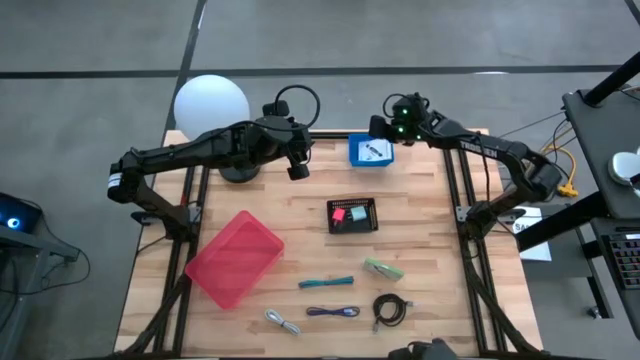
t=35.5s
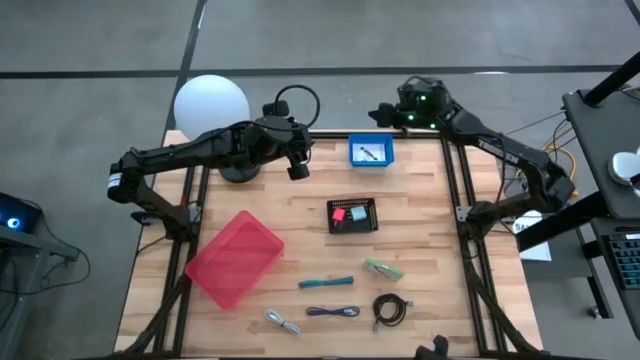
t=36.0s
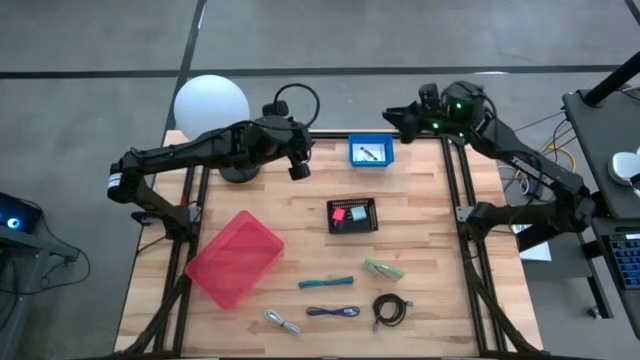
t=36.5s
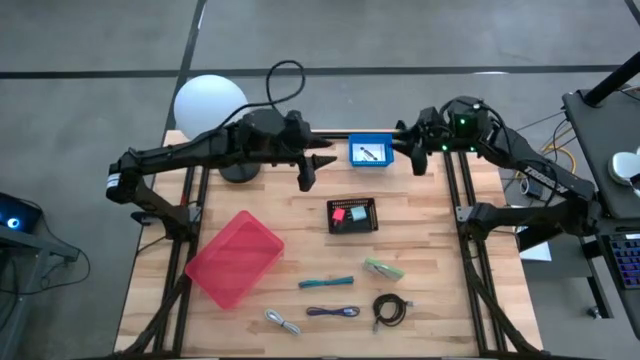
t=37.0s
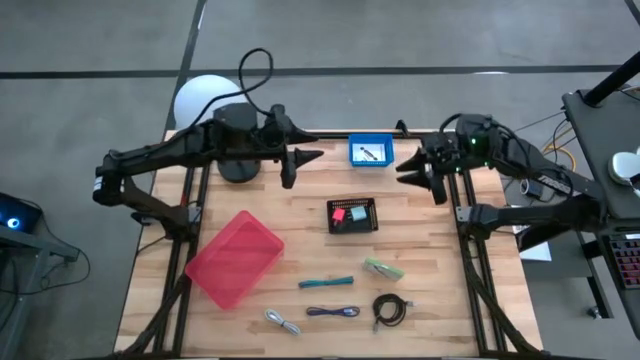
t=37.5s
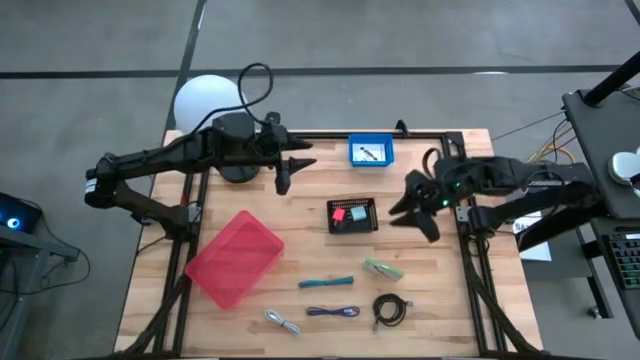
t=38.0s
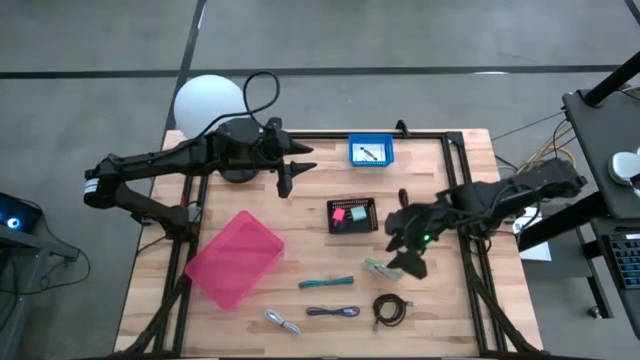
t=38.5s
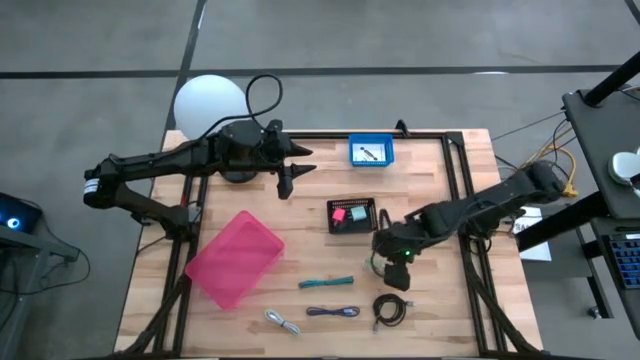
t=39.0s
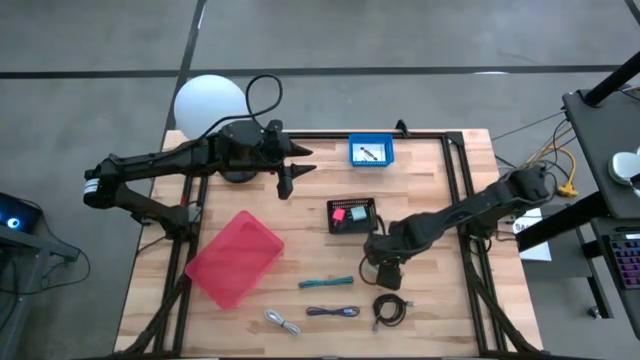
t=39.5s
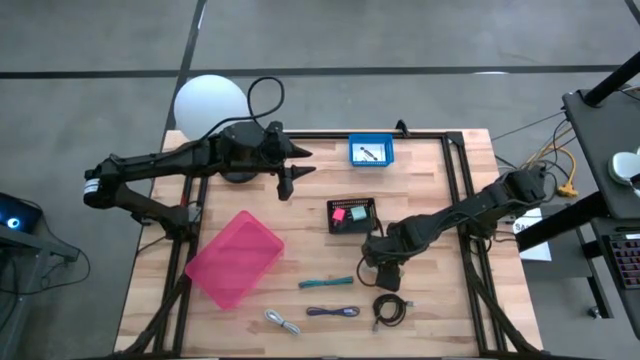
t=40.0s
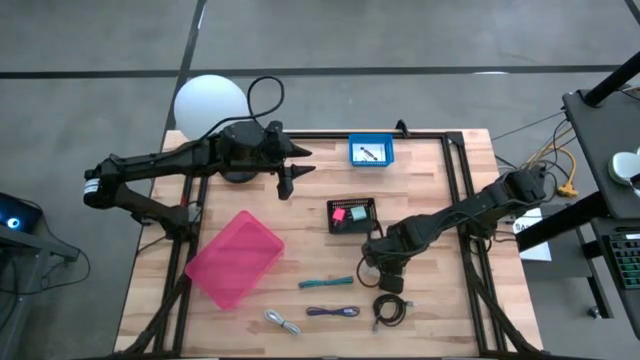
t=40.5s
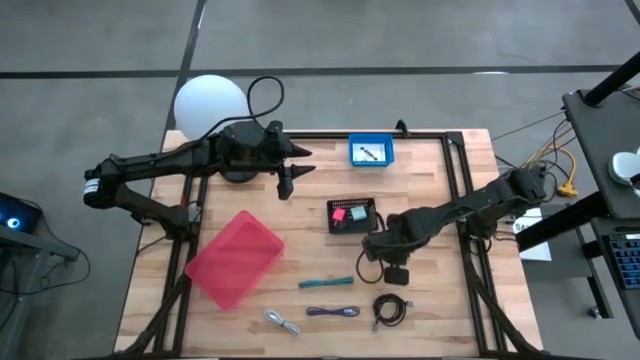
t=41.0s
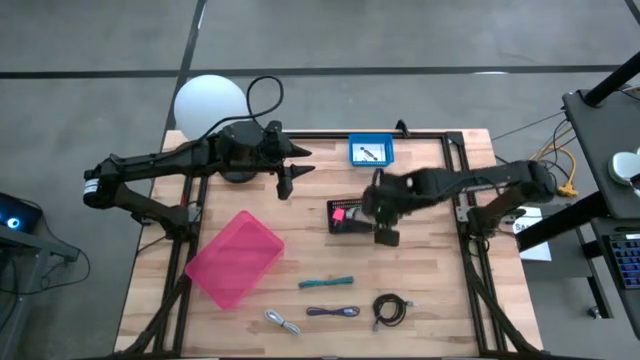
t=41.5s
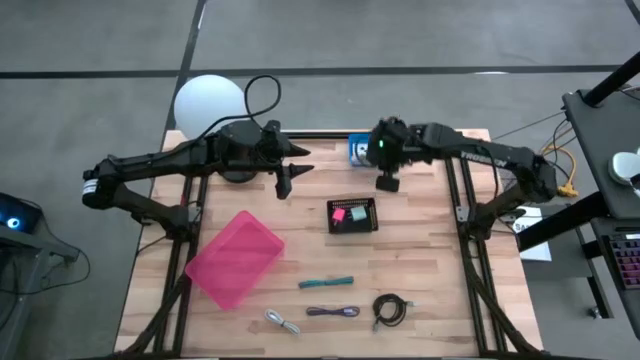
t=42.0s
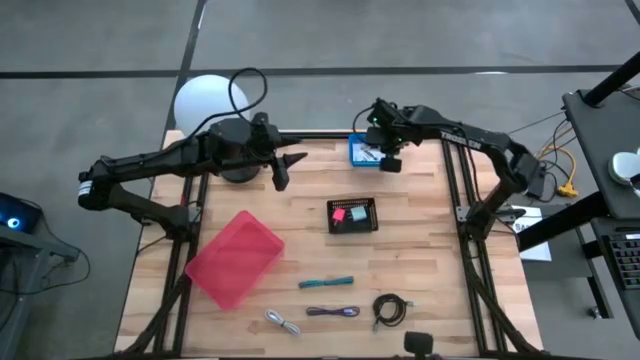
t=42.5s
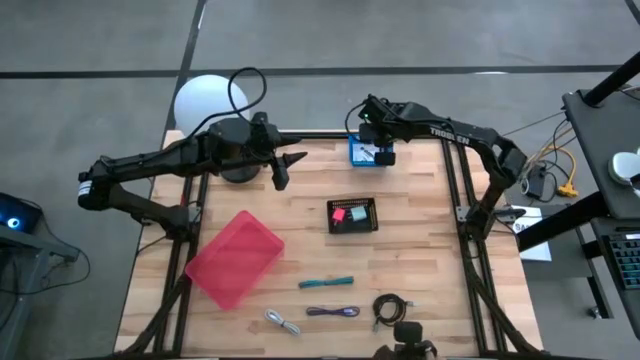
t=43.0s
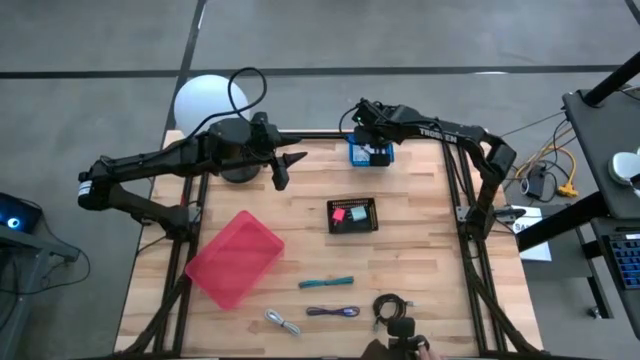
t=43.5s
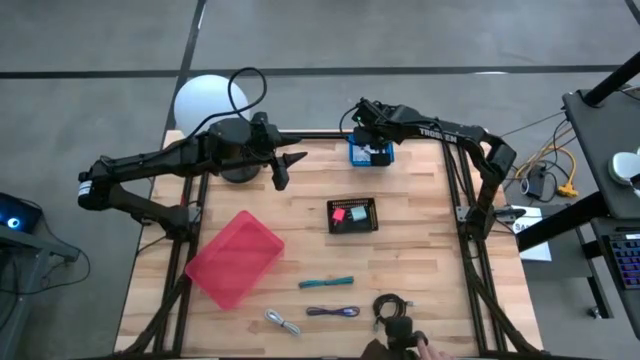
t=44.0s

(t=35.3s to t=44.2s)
Task: Pick and place items into bin
Put the white box into the blue bin

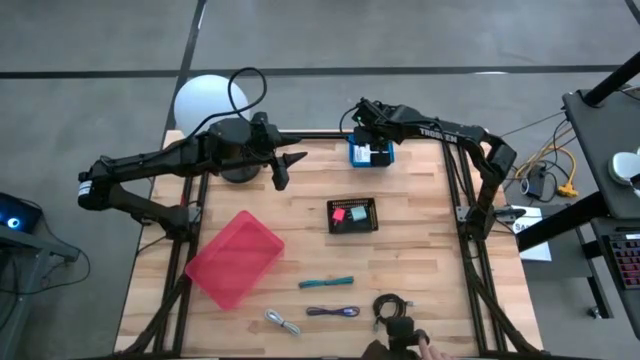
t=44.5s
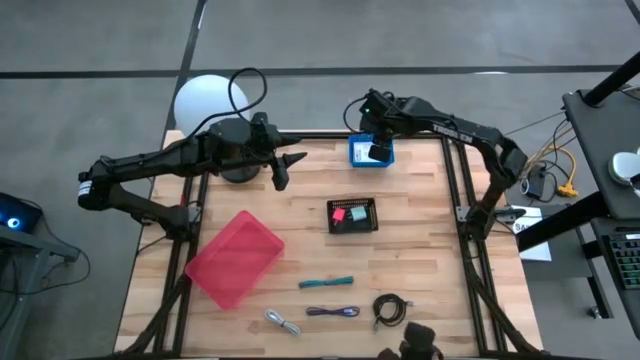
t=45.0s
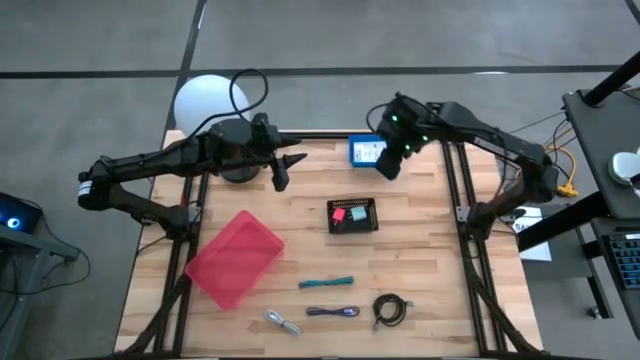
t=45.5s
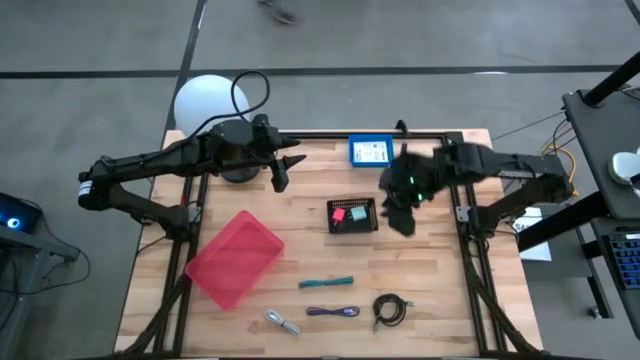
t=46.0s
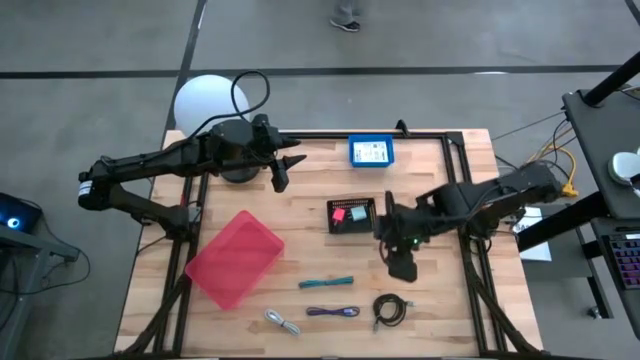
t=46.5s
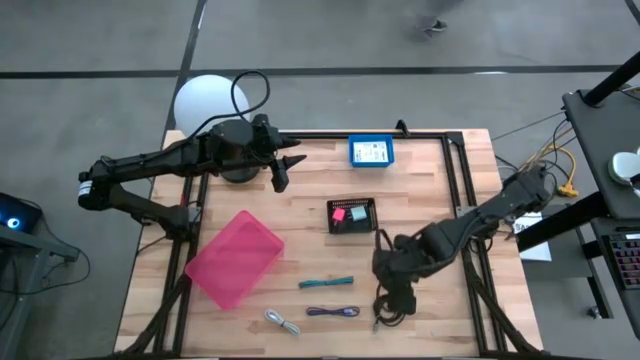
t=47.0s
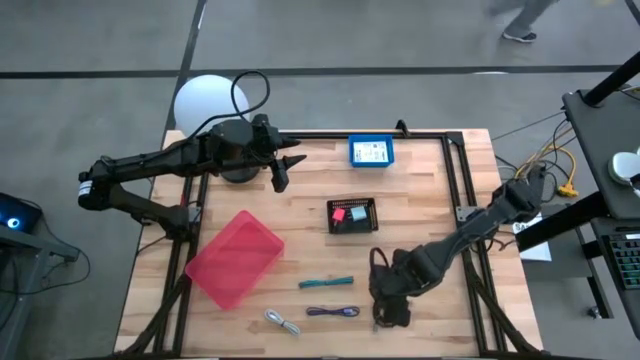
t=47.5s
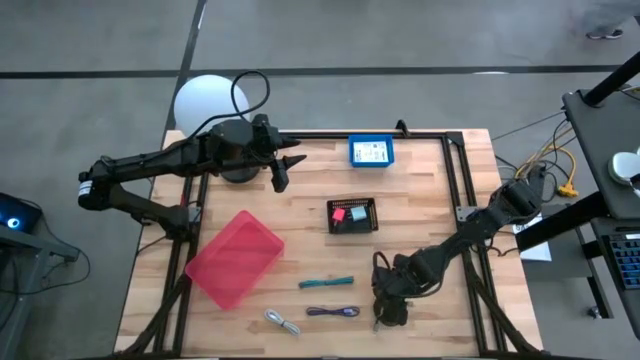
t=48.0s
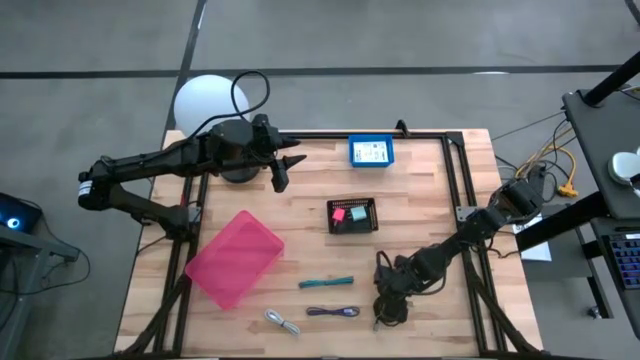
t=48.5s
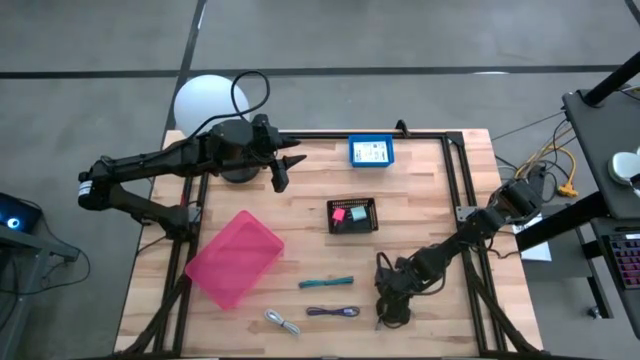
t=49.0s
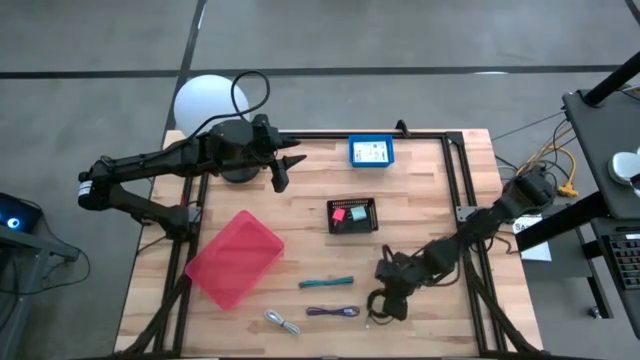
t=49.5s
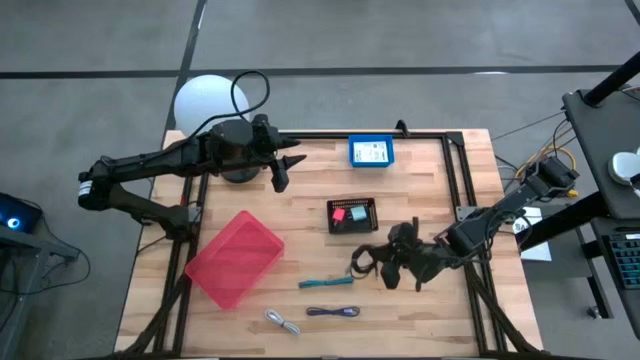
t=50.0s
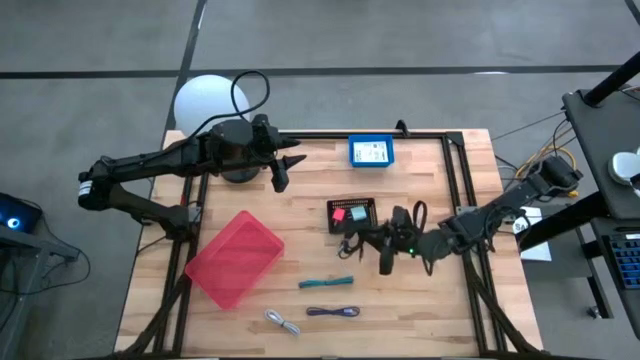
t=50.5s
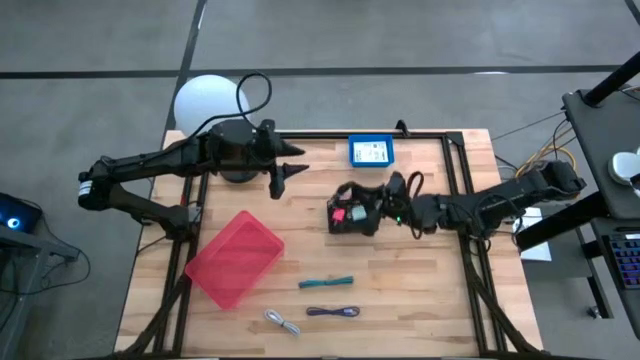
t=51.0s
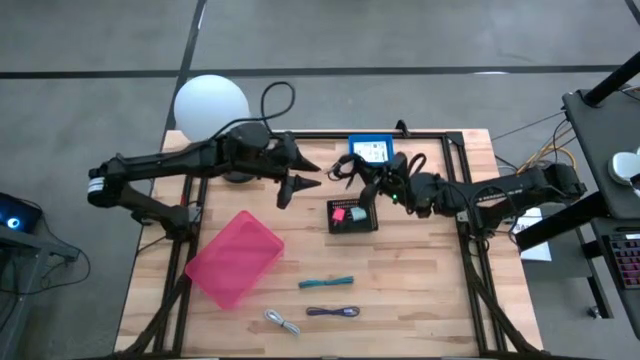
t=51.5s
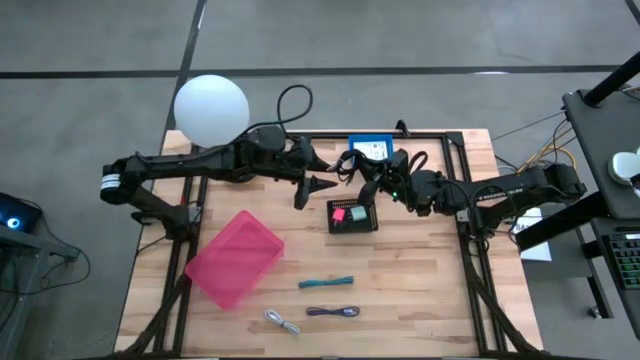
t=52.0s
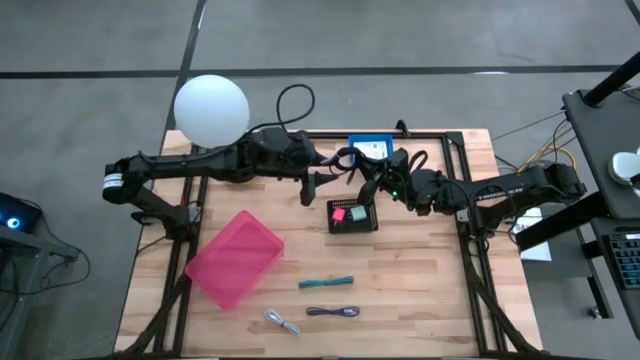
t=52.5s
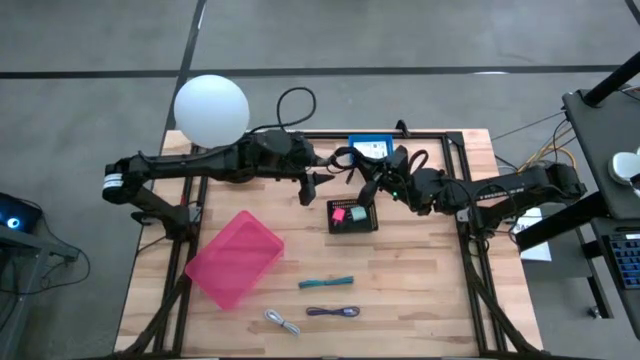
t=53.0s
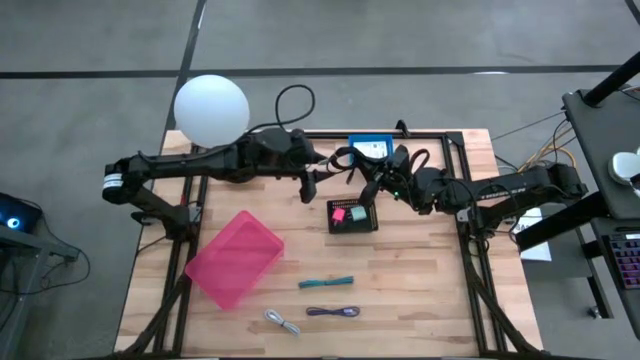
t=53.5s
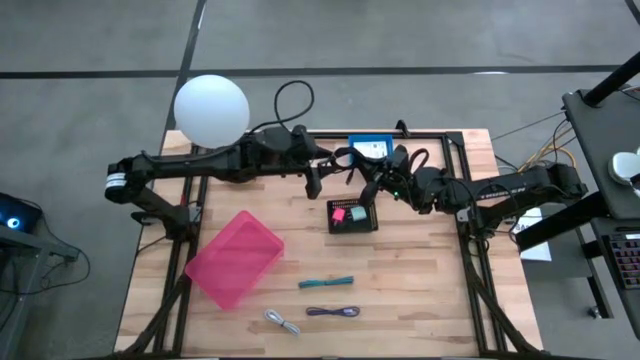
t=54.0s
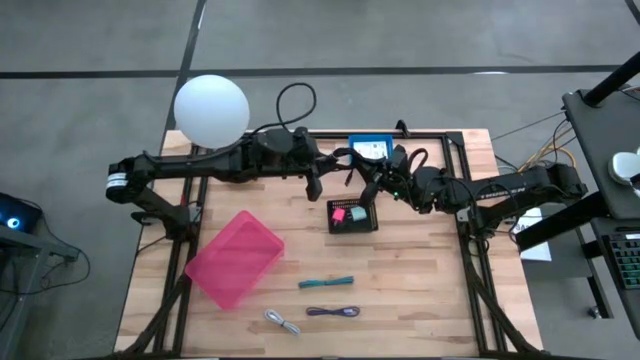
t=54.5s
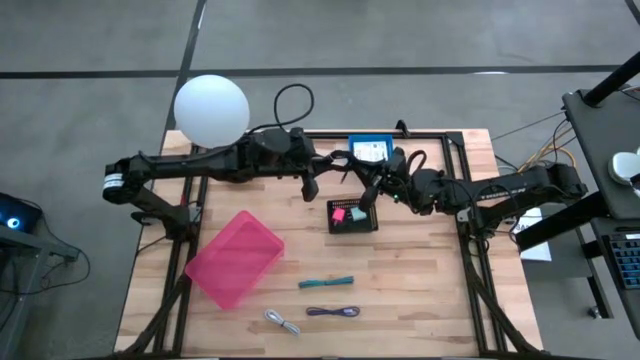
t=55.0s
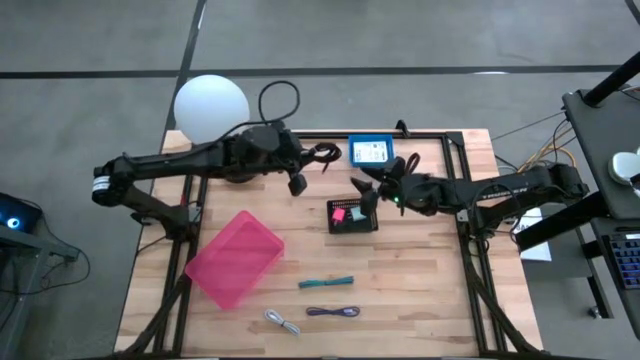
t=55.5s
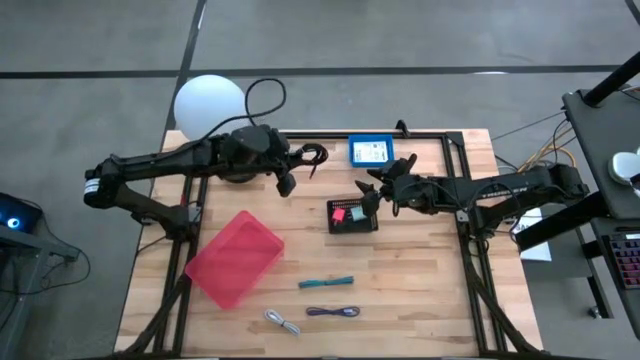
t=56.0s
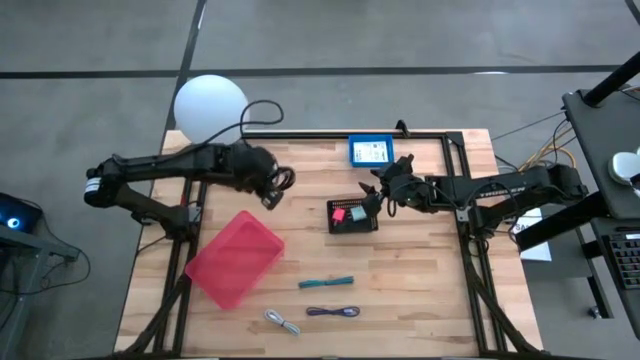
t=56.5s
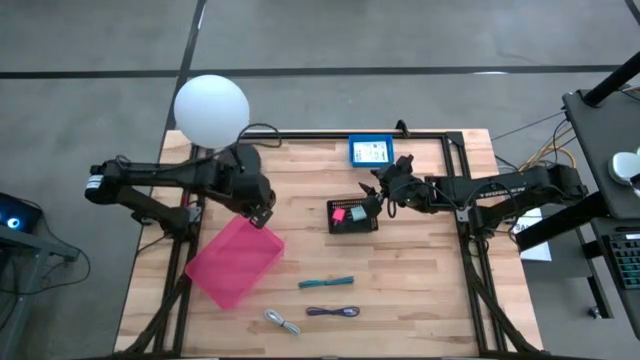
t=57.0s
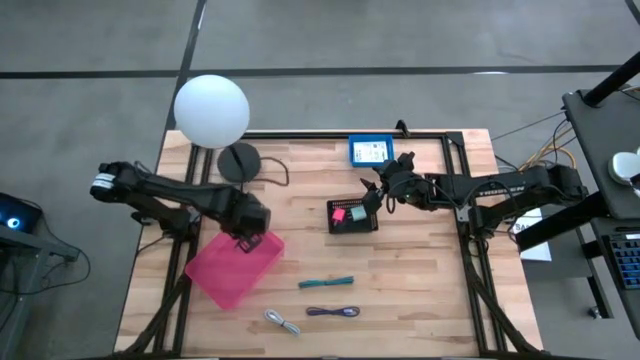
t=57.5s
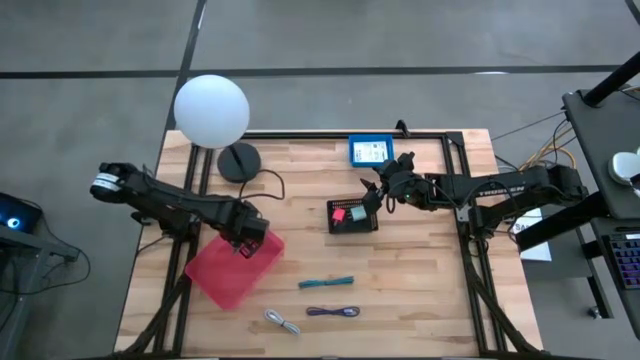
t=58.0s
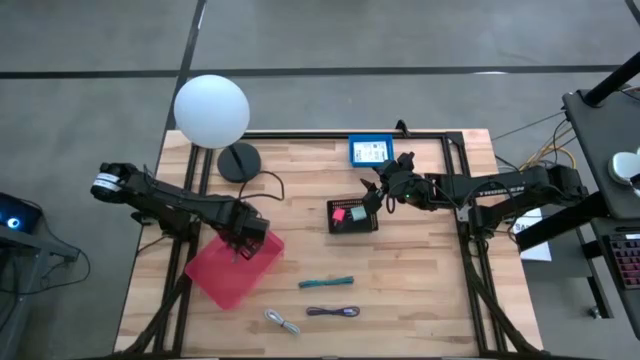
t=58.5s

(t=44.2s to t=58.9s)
Put the black charger cable into the pink bin
